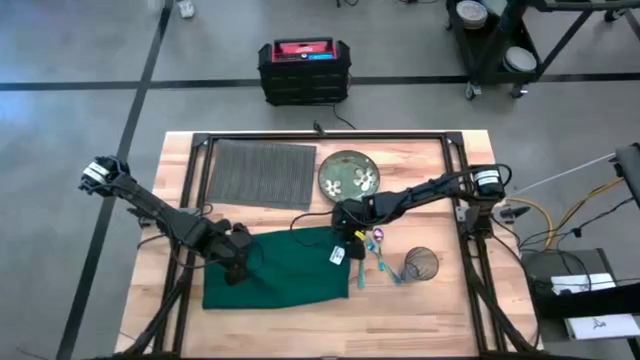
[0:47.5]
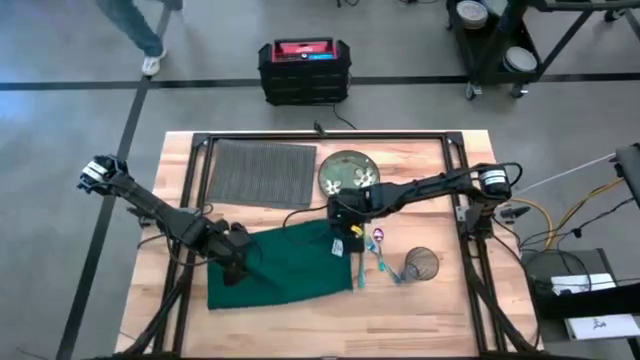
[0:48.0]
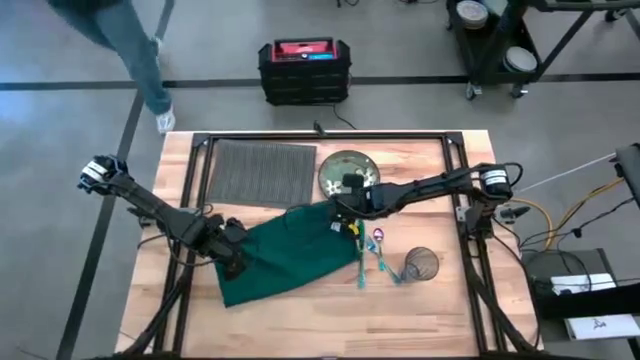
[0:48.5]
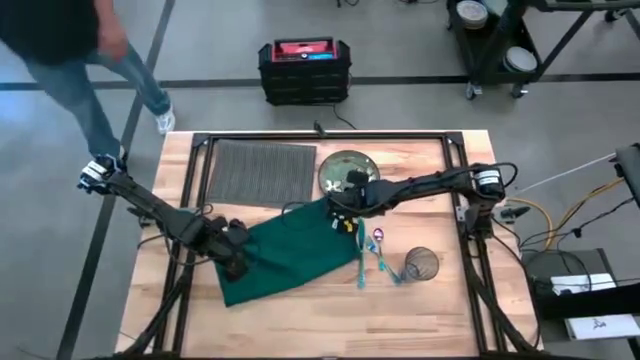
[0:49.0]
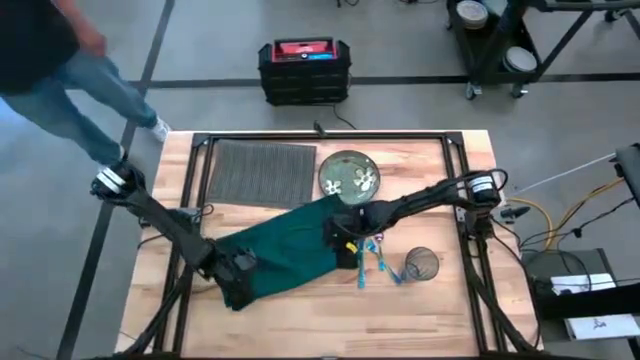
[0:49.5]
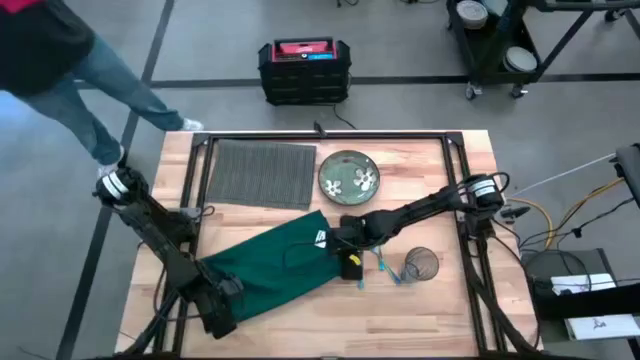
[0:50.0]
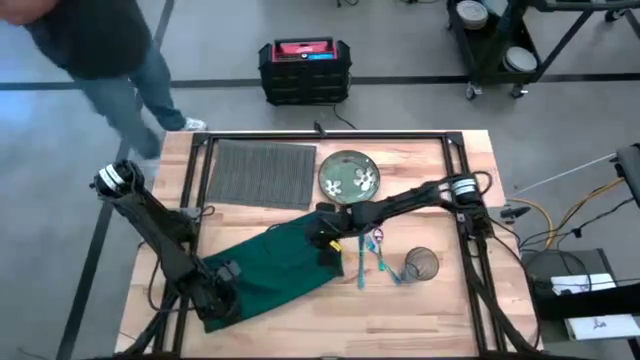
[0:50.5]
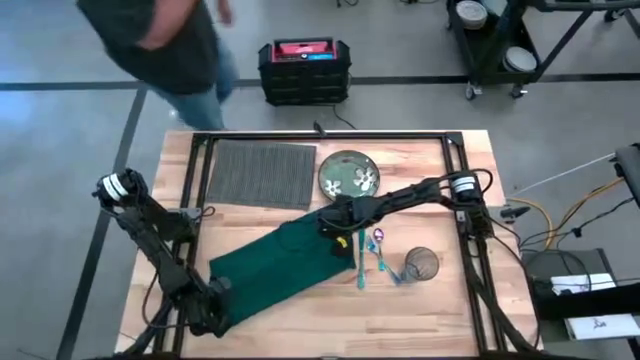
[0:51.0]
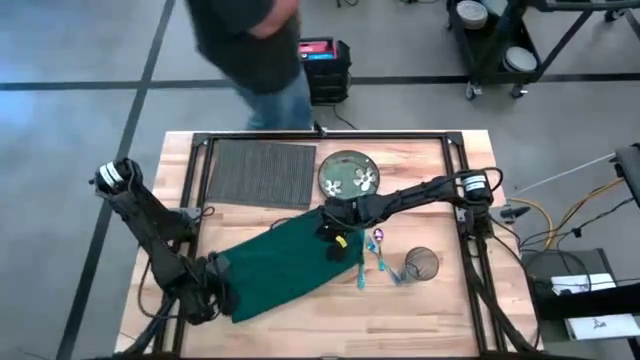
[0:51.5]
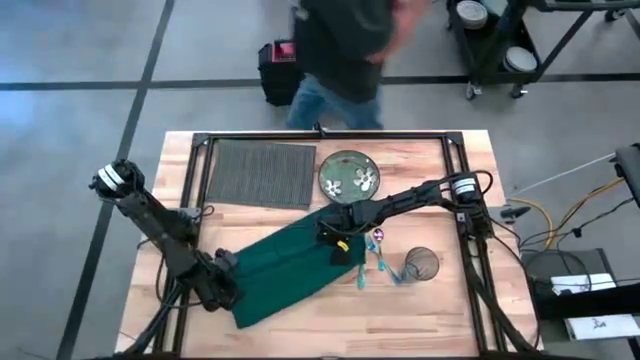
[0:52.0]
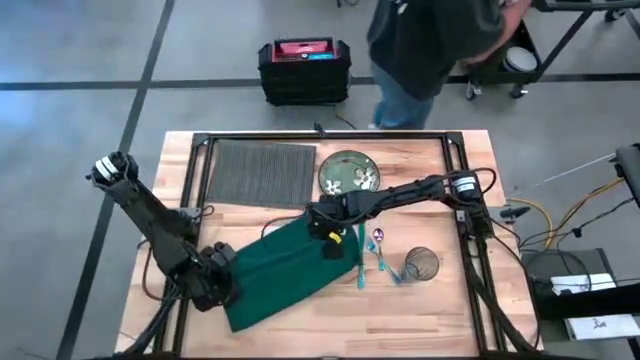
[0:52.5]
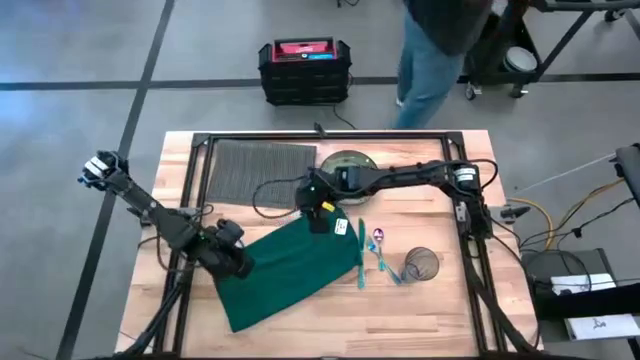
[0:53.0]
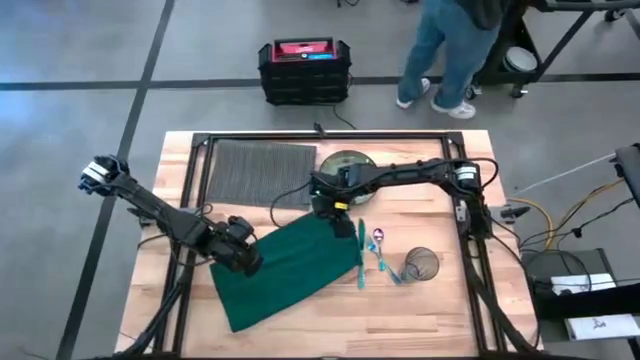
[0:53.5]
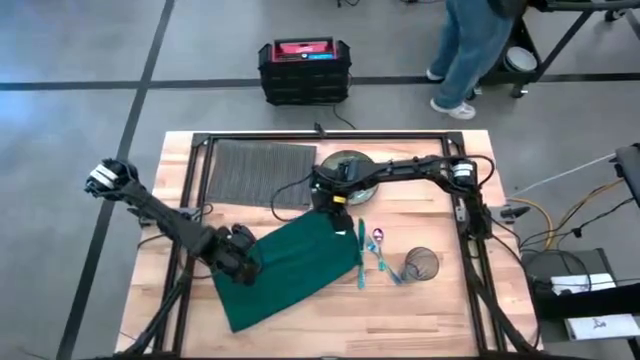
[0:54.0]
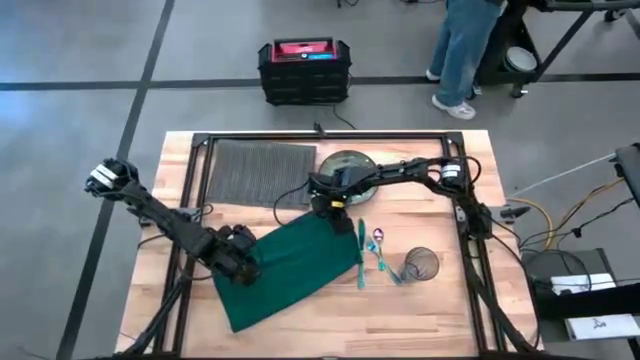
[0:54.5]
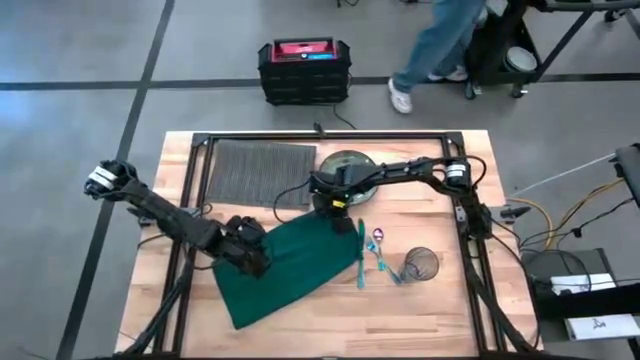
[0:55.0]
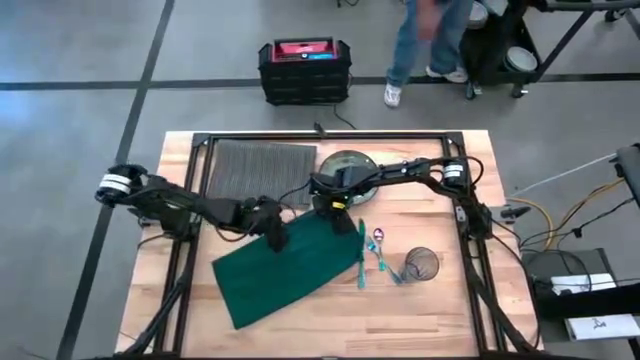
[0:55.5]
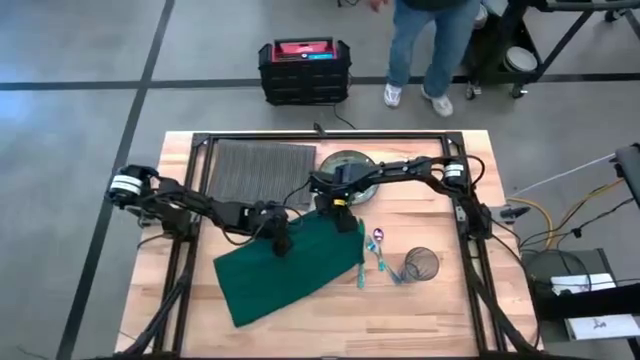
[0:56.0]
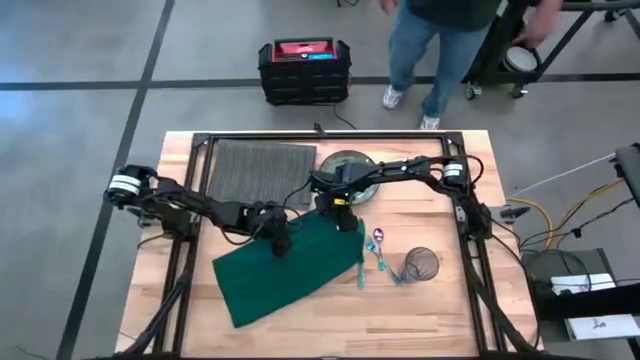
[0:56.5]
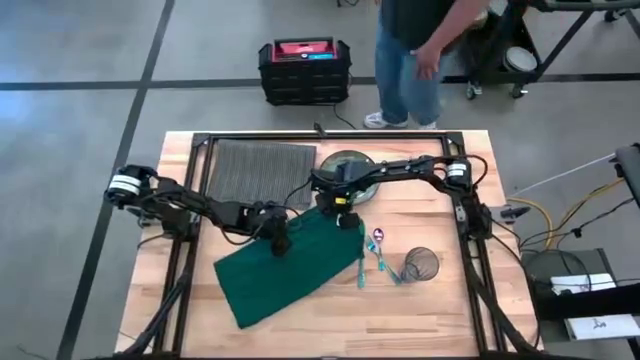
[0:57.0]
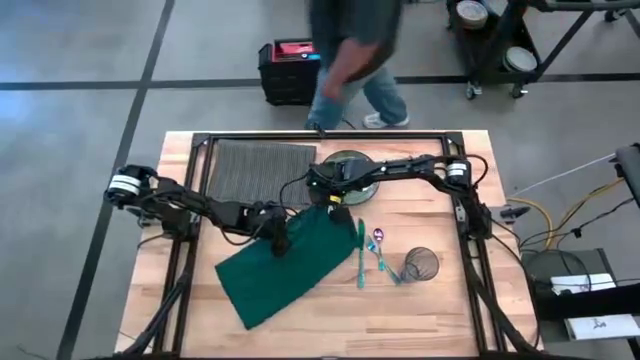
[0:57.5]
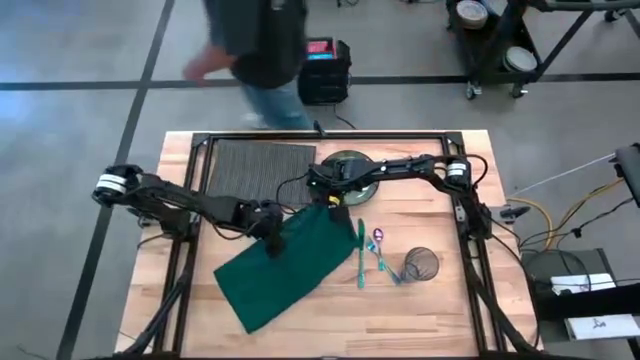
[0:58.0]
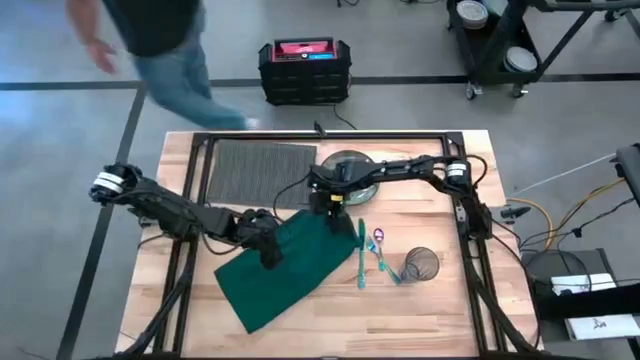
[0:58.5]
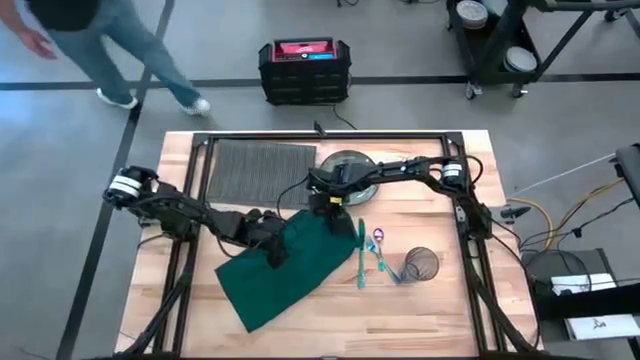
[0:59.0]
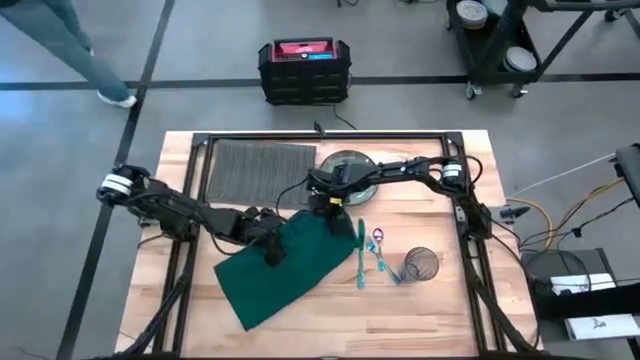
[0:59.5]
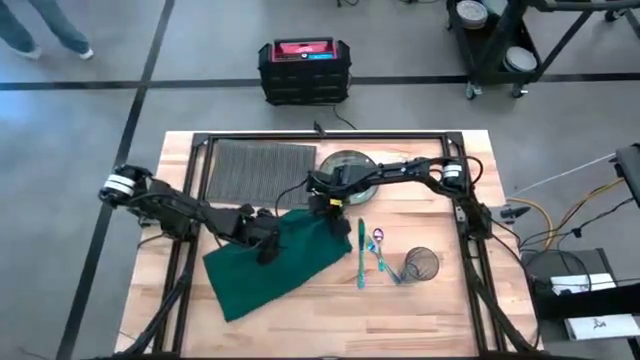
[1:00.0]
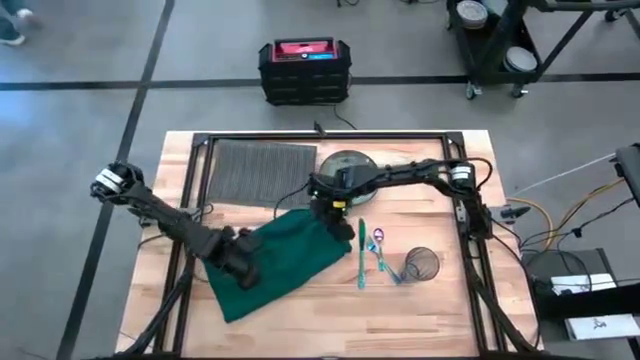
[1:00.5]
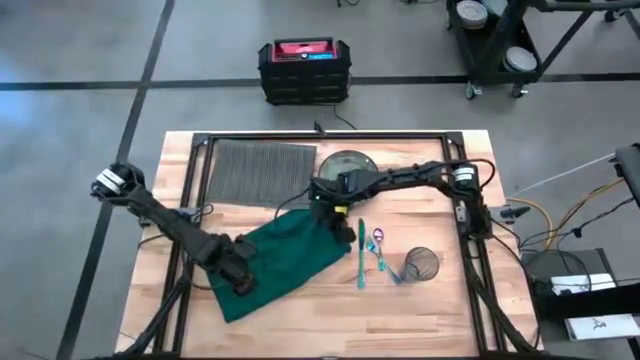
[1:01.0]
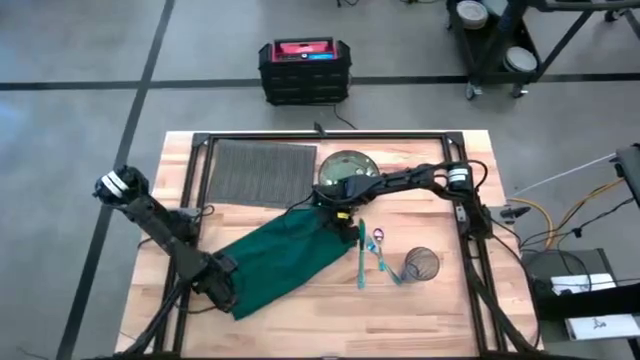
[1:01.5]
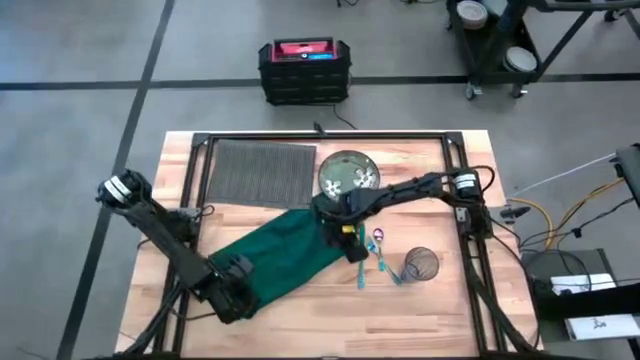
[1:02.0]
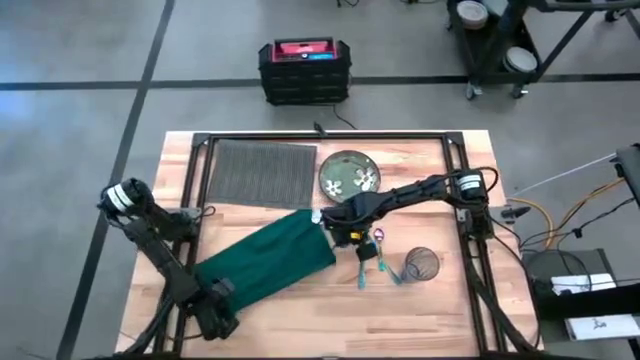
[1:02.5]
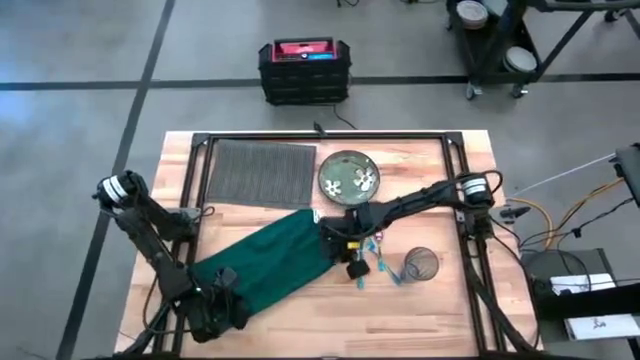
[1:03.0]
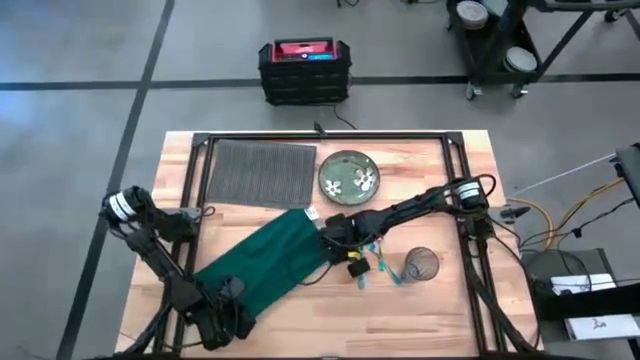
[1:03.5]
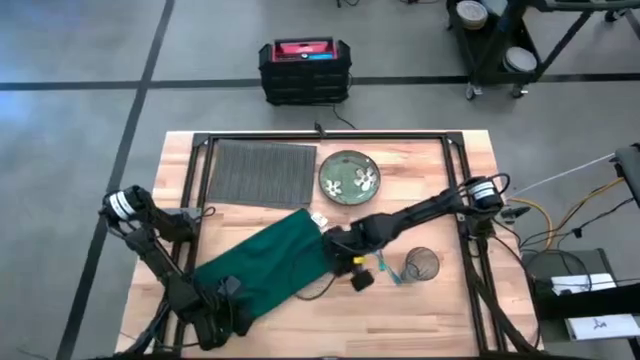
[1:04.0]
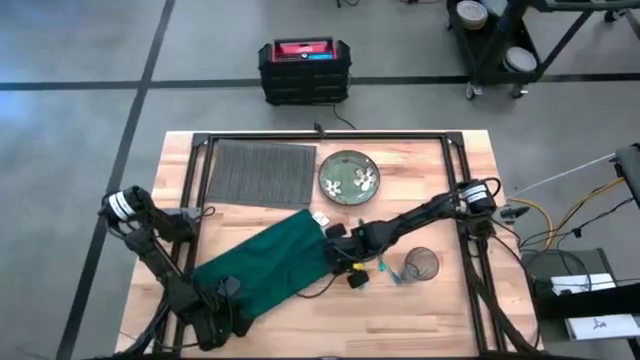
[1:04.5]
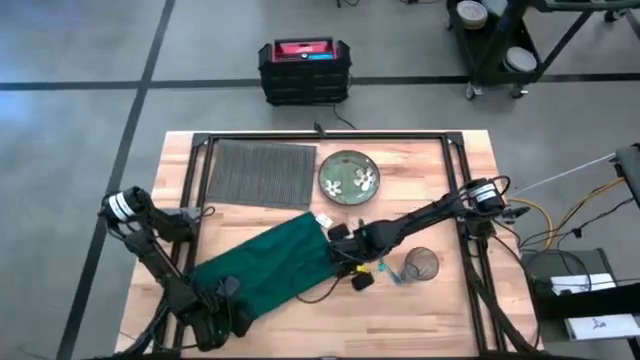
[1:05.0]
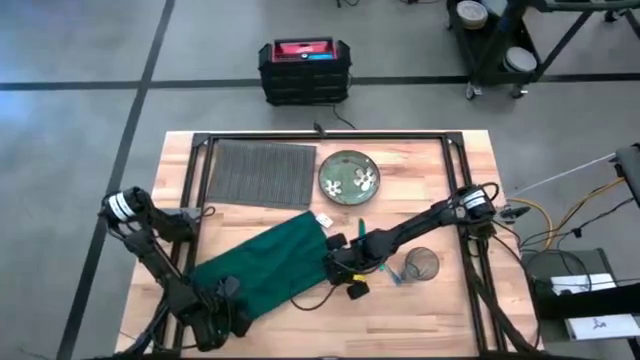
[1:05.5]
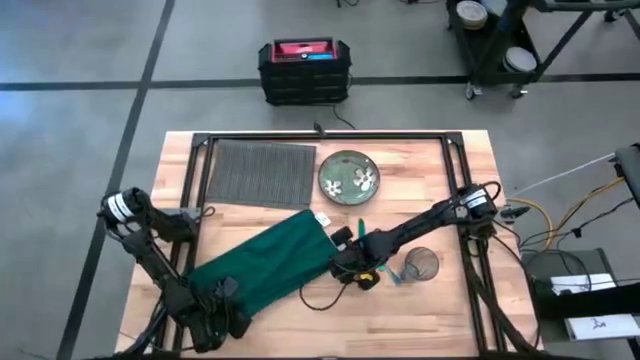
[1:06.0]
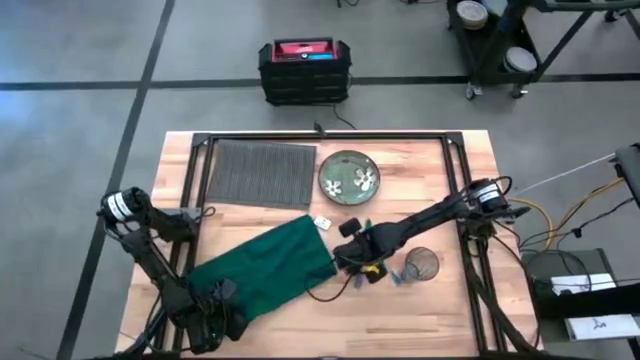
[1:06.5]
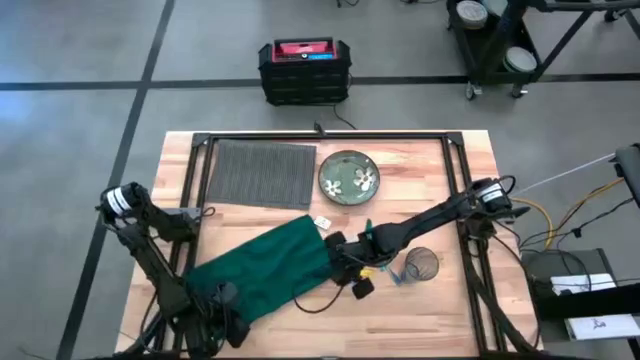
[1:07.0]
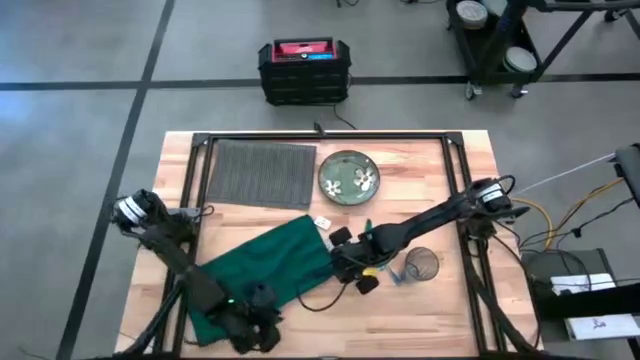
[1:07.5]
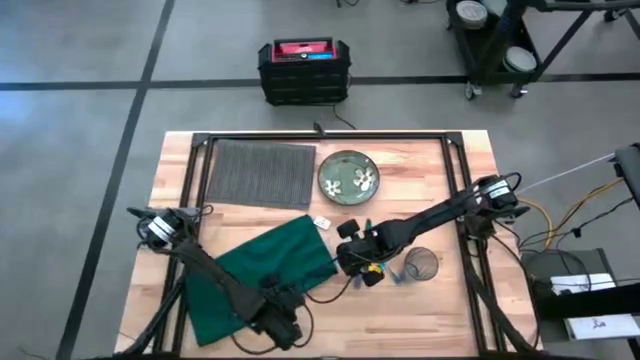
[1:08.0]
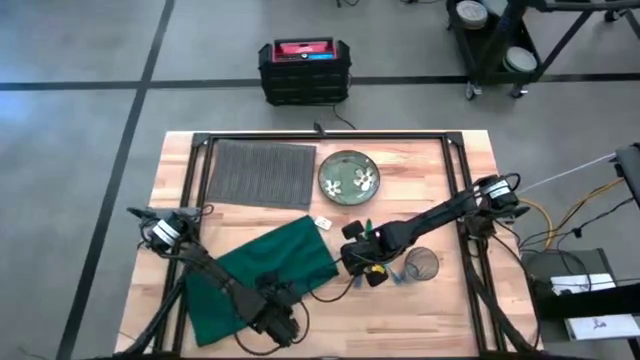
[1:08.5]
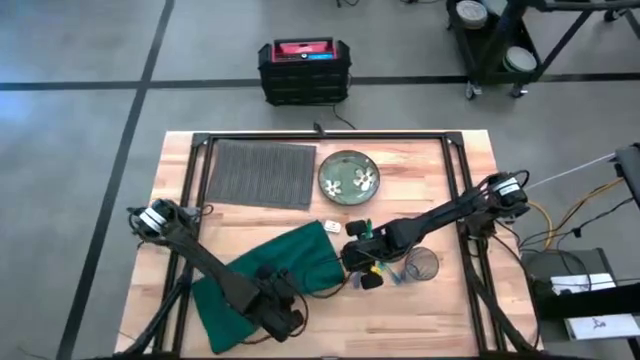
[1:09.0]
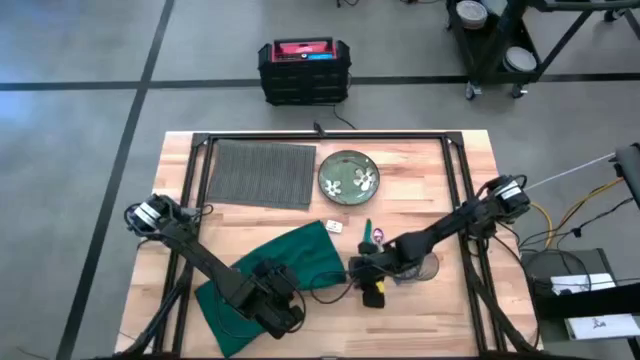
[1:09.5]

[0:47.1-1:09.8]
Task: Set table place
Fold the green napkin
